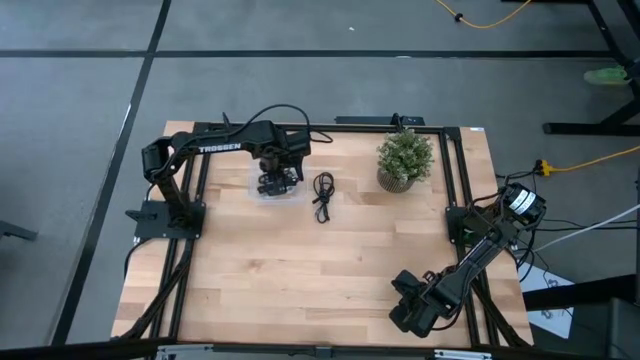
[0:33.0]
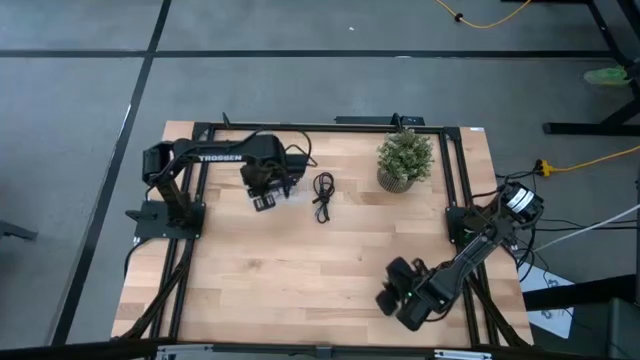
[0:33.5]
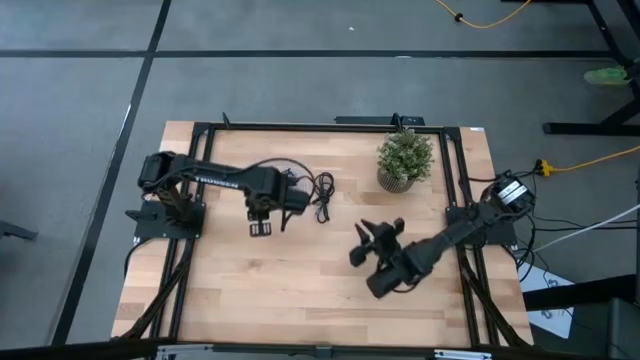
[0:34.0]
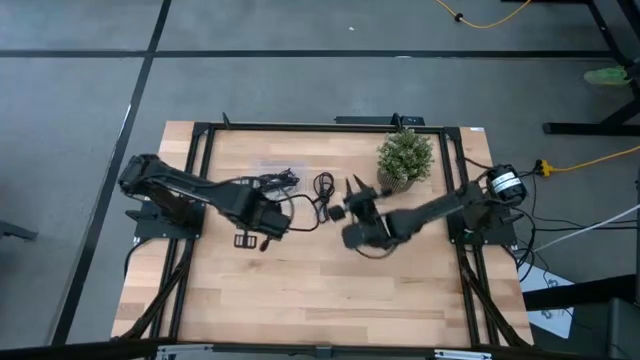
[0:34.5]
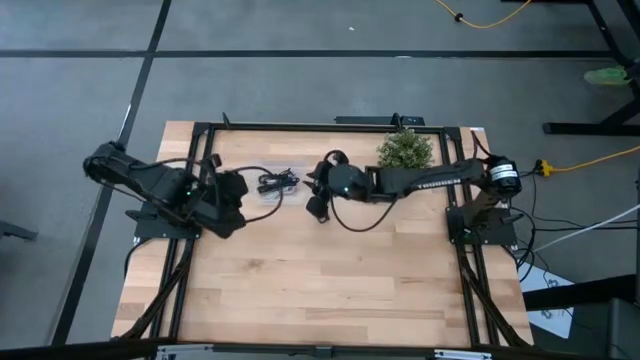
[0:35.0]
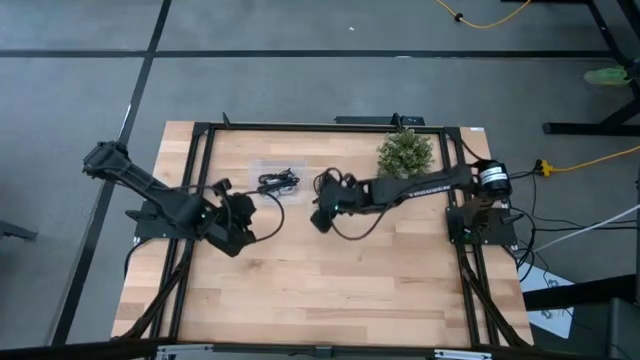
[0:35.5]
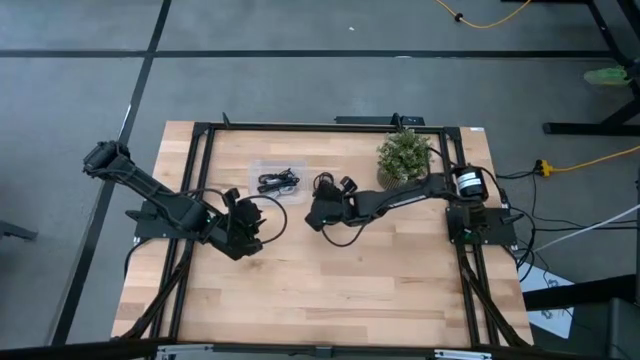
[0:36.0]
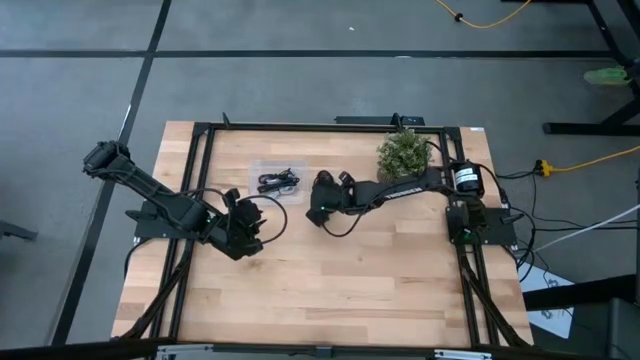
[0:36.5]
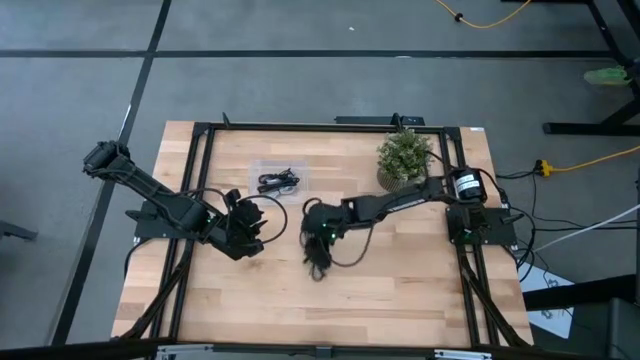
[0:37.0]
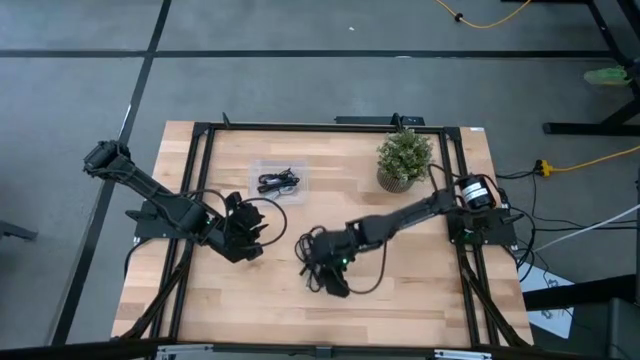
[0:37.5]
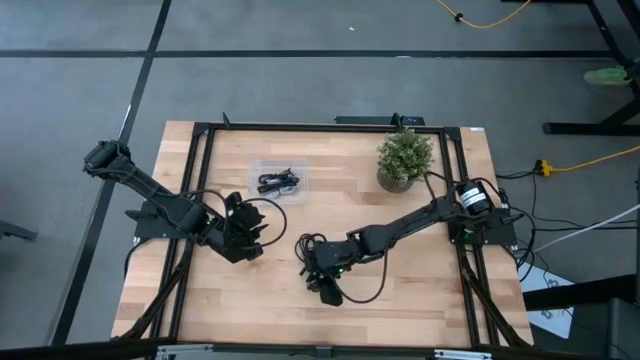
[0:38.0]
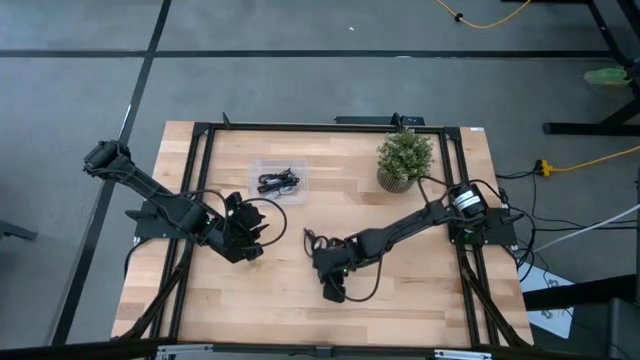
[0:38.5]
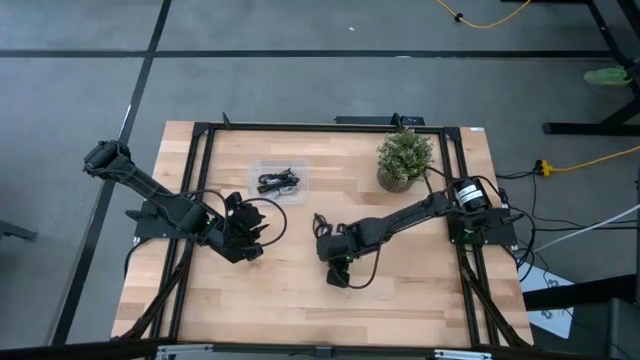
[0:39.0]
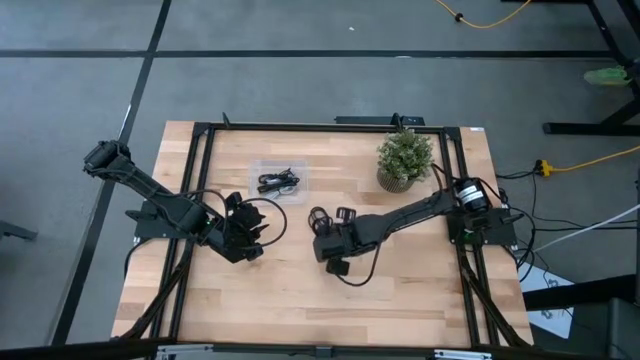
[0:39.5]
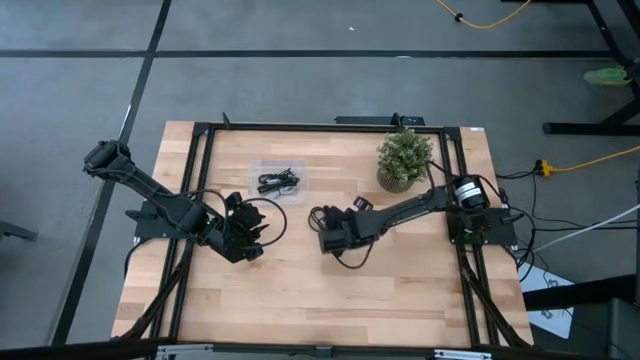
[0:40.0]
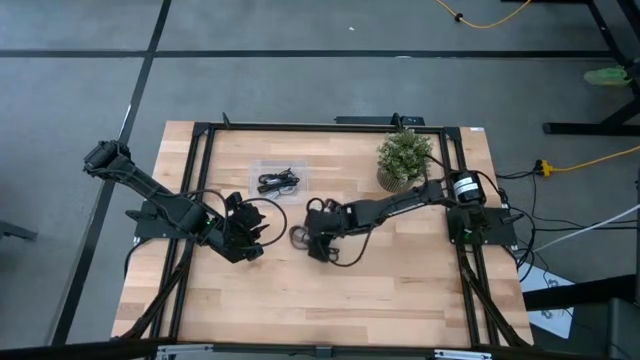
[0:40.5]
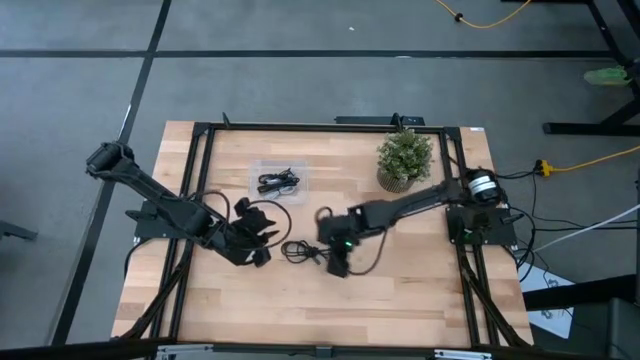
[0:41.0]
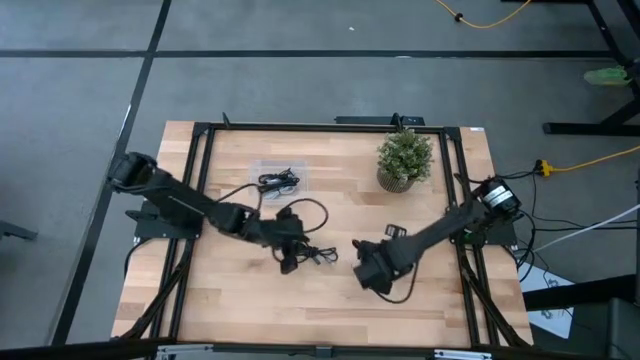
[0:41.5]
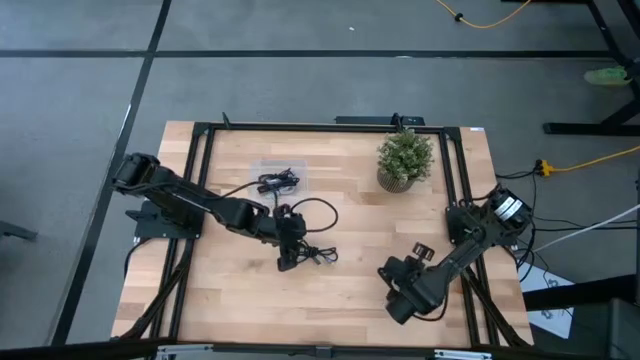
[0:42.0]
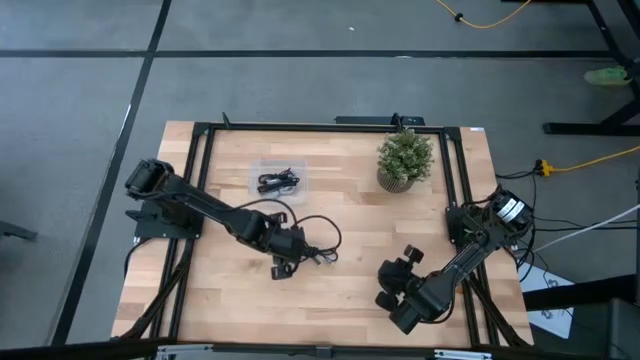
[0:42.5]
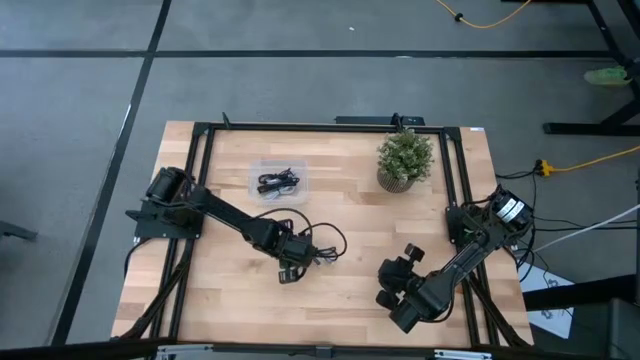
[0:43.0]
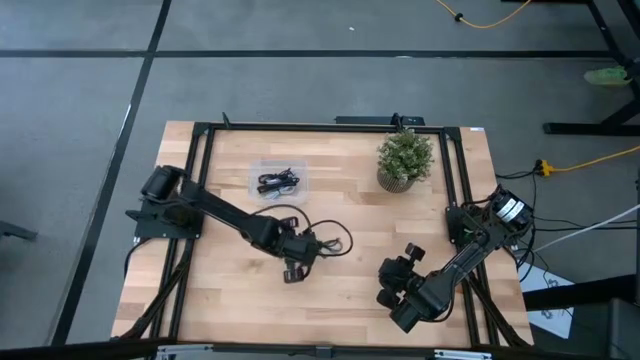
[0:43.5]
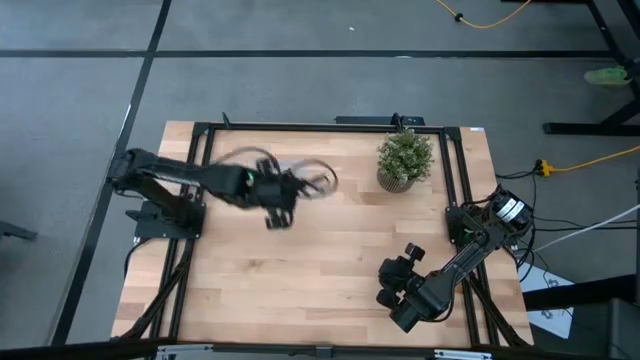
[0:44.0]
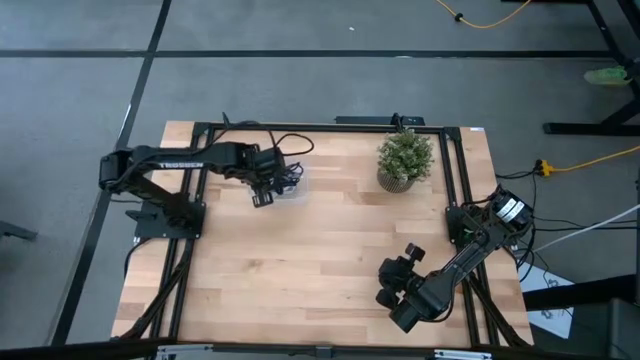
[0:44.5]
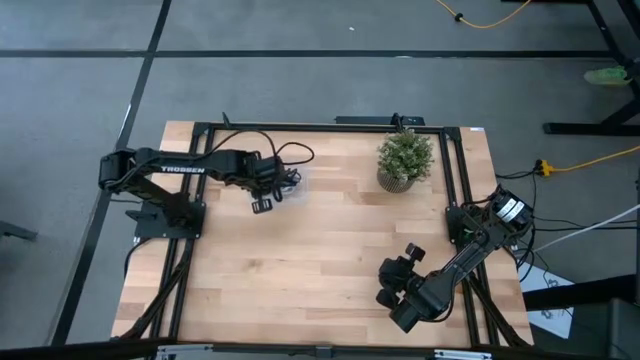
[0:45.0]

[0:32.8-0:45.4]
Task: Pick and place USB-C Cables
Put the black USB cable into the transparent bin

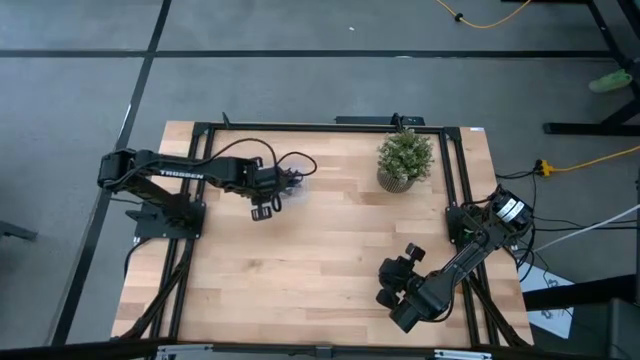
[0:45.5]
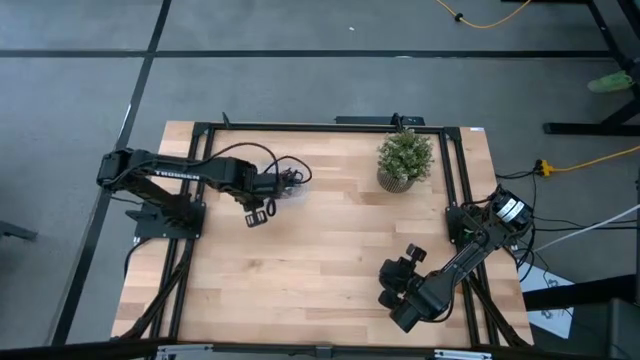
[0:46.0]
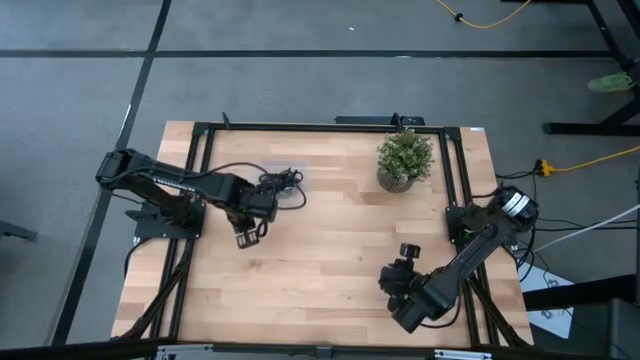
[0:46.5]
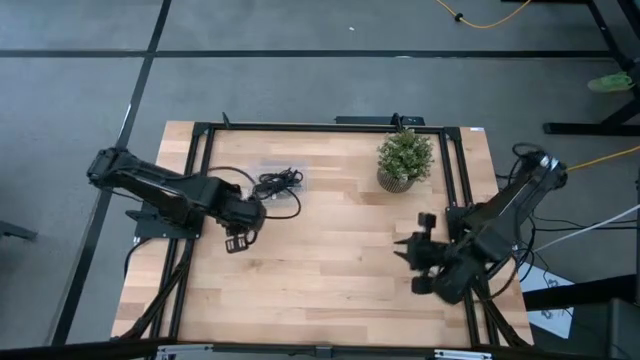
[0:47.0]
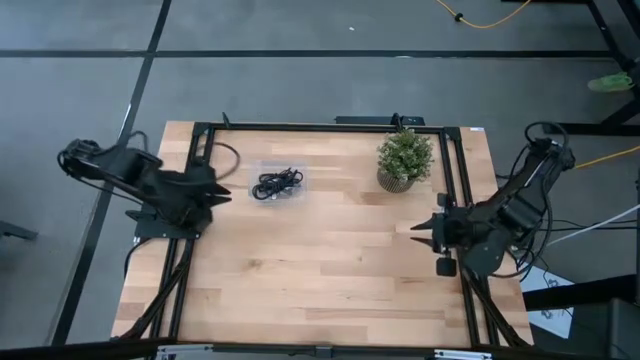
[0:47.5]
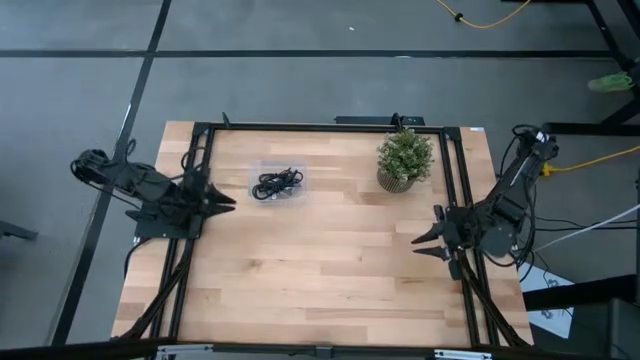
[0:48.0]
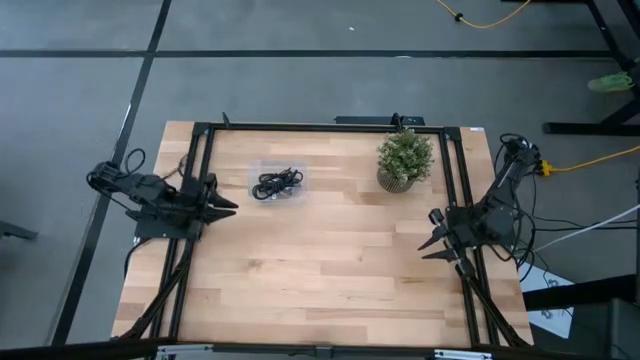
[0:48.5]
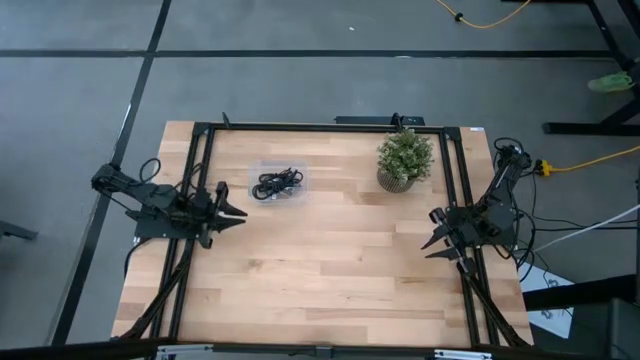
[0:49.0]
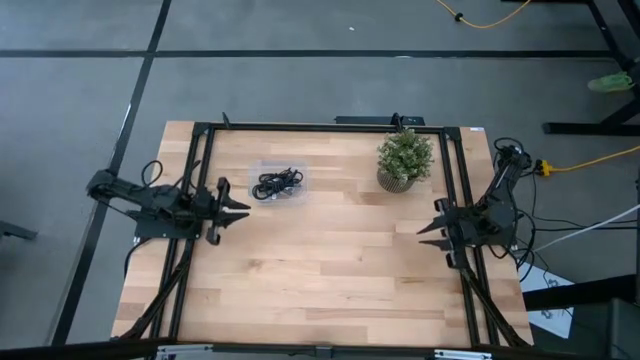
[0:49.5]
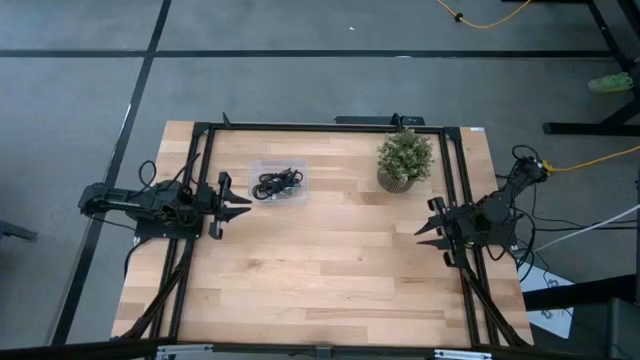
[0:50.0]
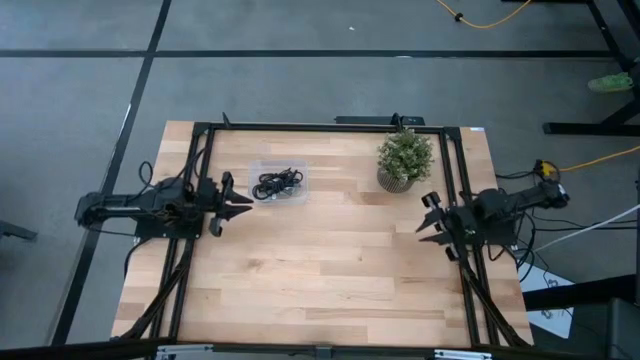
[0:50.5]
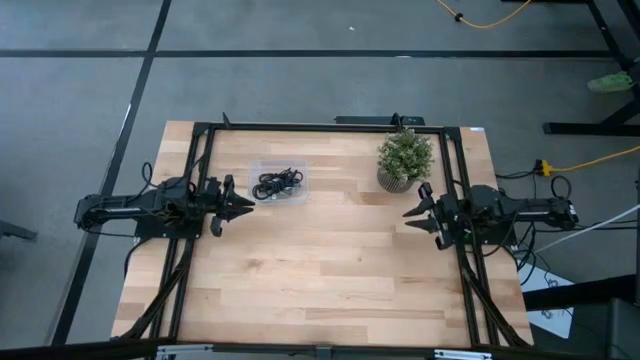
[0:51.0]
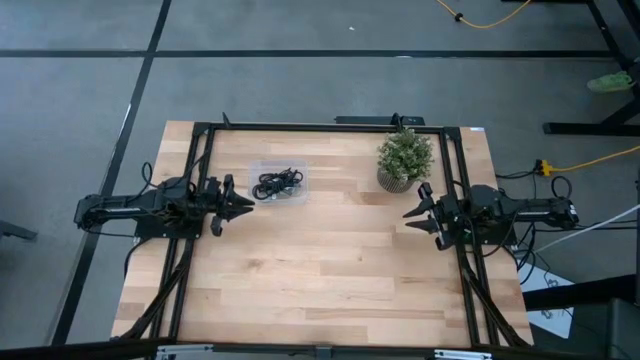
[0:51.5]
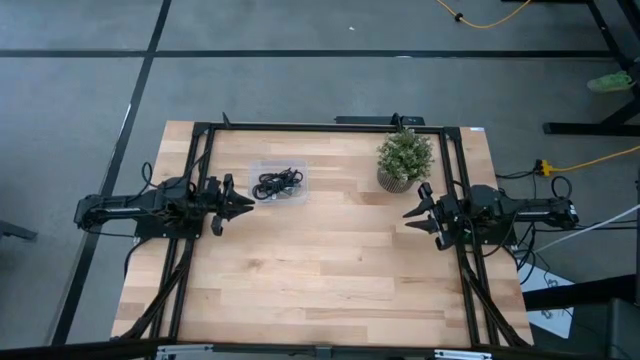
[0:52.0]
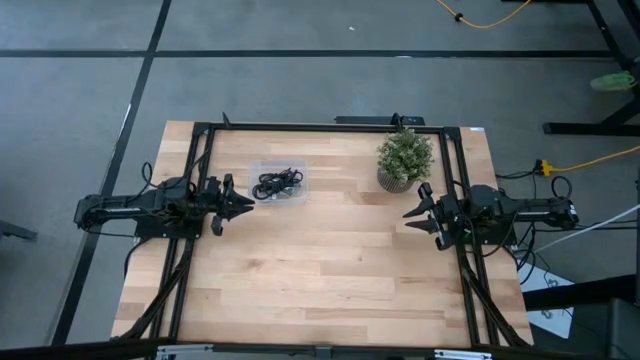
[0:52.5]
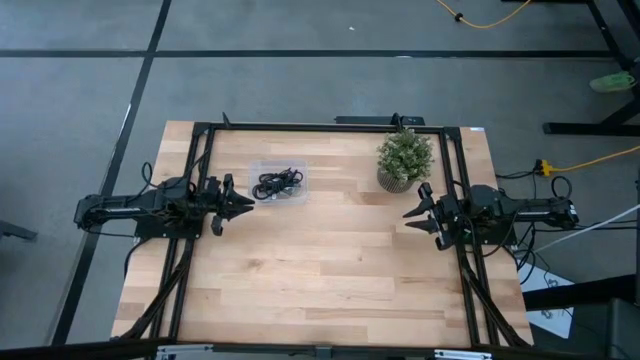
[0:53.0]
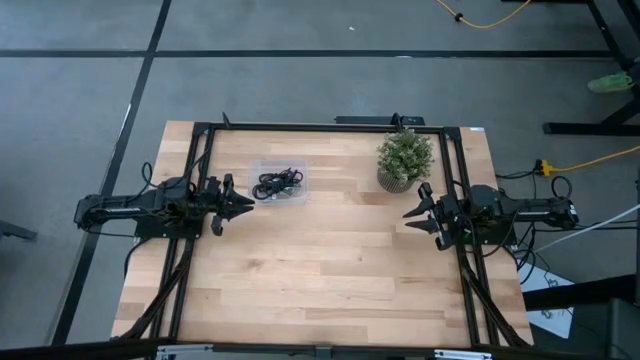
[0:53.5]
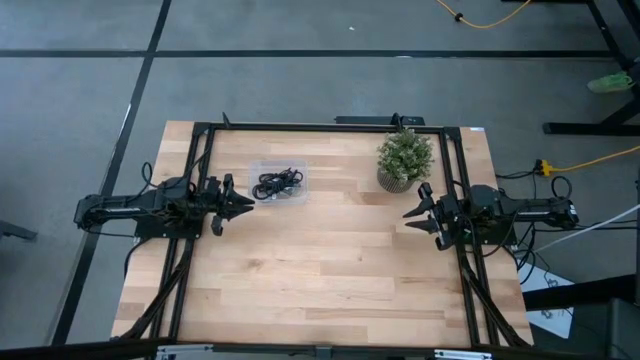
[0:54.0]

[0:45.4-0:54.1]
Return to Home Position
